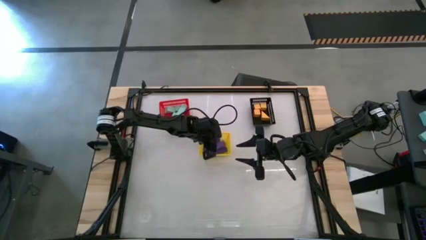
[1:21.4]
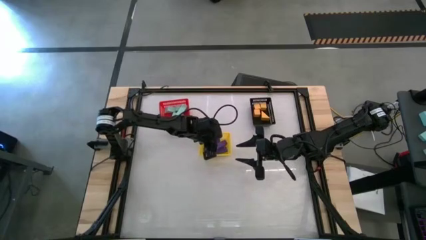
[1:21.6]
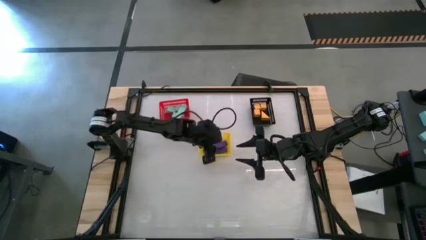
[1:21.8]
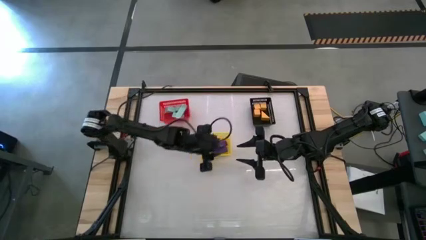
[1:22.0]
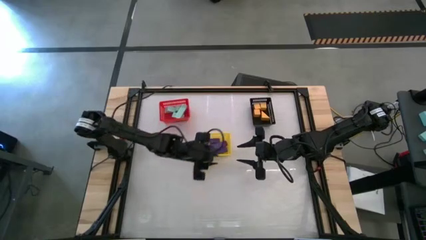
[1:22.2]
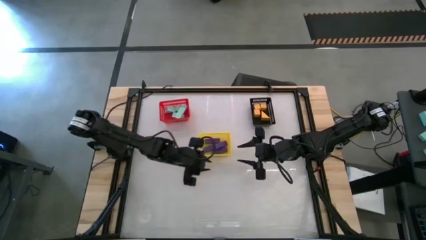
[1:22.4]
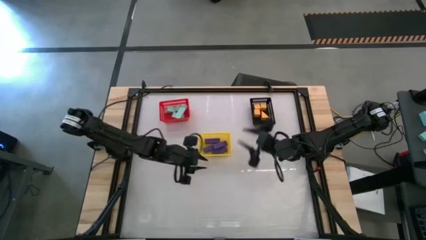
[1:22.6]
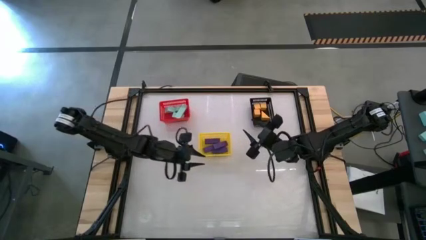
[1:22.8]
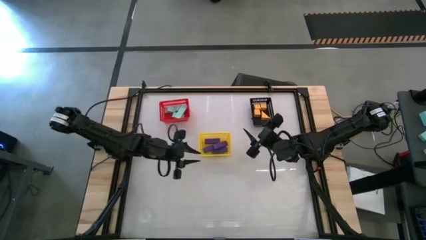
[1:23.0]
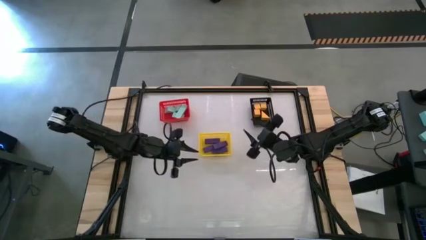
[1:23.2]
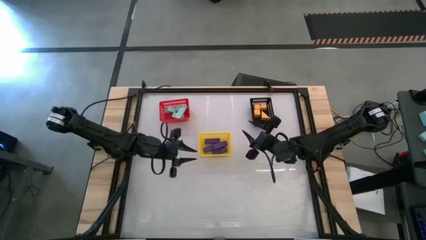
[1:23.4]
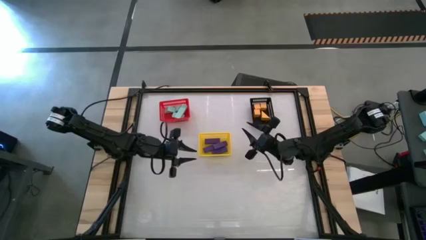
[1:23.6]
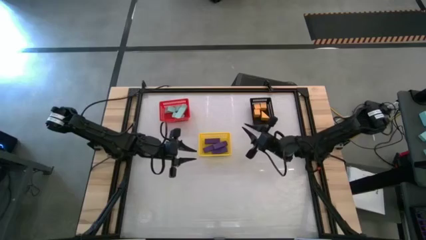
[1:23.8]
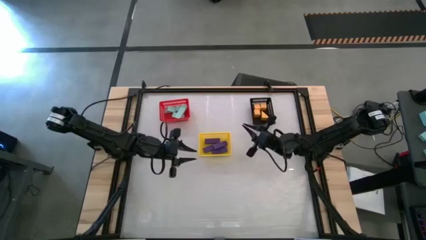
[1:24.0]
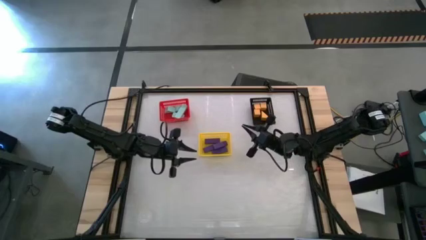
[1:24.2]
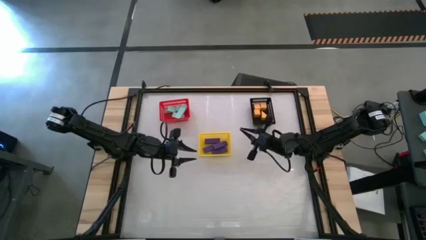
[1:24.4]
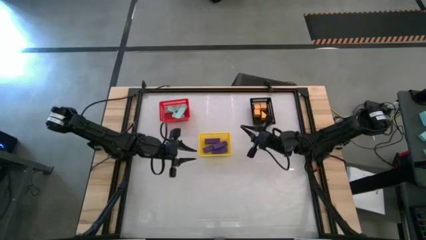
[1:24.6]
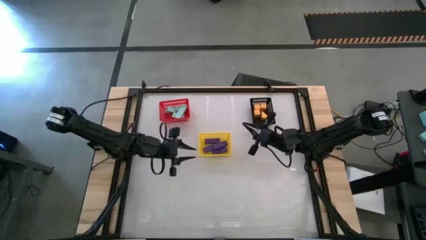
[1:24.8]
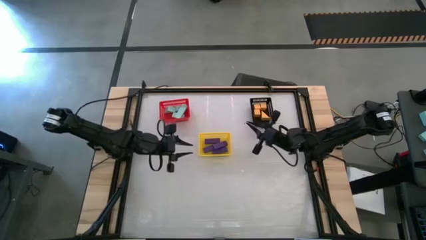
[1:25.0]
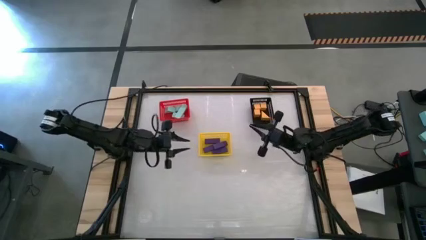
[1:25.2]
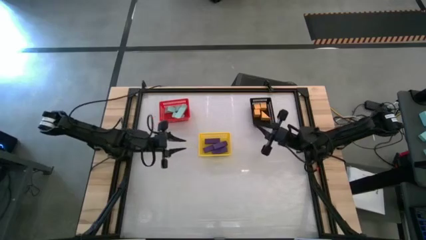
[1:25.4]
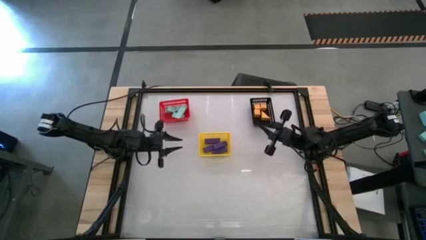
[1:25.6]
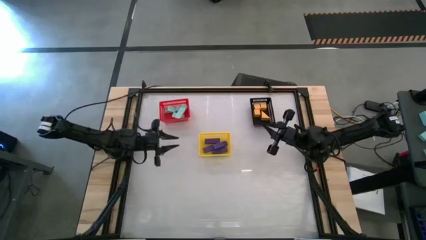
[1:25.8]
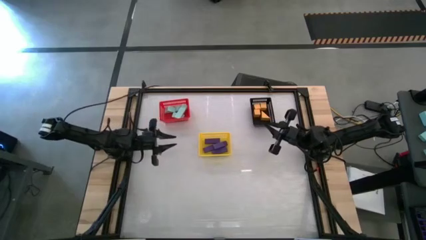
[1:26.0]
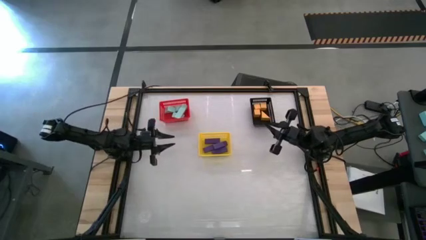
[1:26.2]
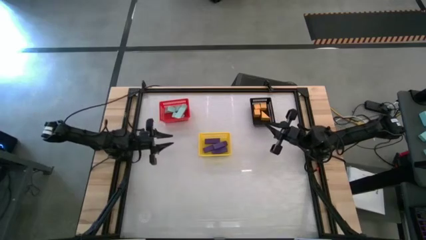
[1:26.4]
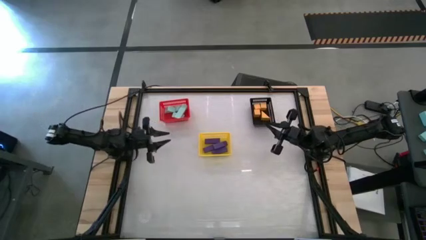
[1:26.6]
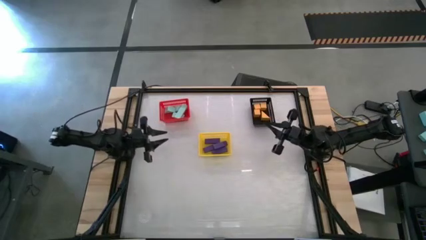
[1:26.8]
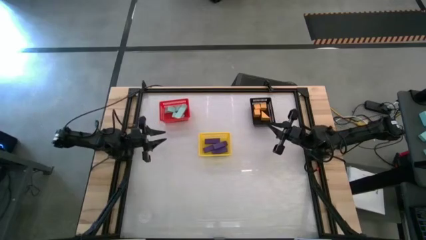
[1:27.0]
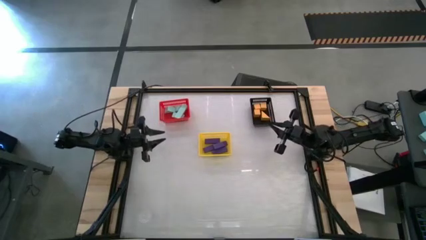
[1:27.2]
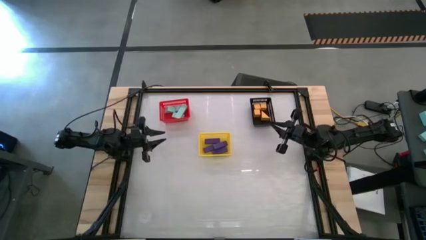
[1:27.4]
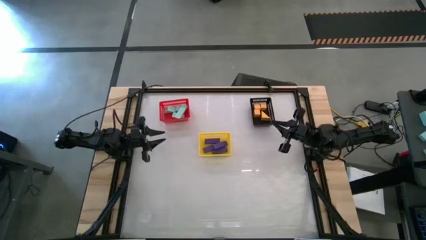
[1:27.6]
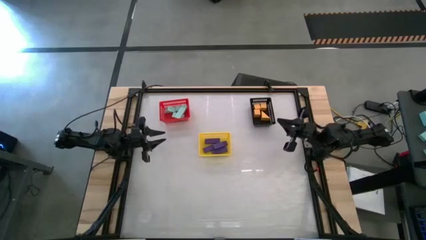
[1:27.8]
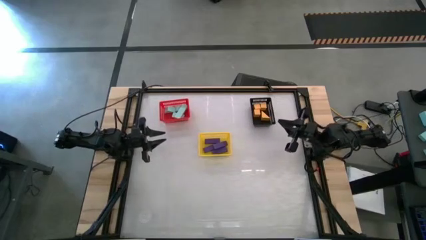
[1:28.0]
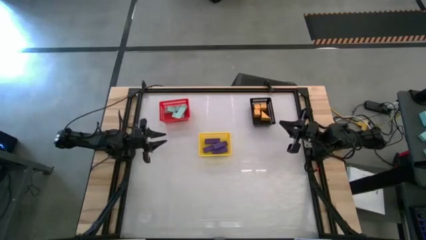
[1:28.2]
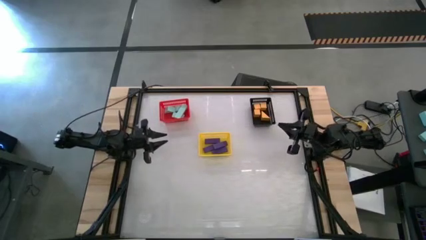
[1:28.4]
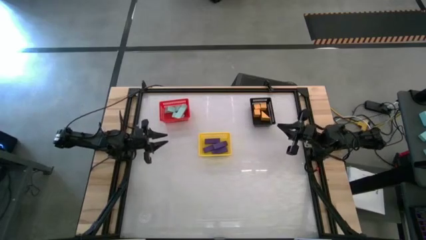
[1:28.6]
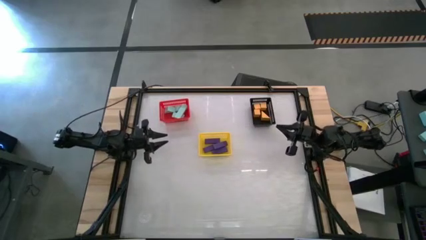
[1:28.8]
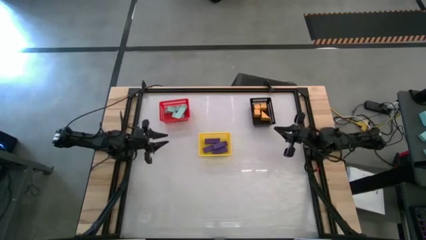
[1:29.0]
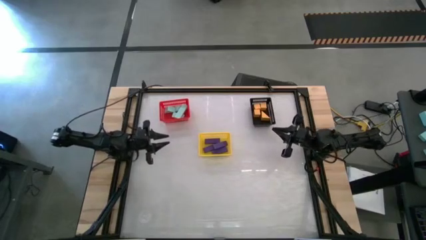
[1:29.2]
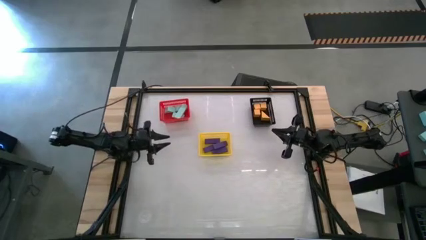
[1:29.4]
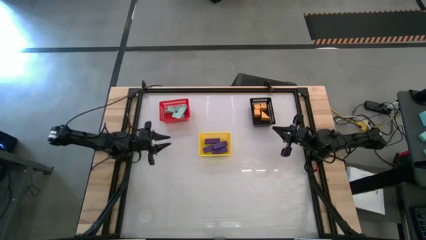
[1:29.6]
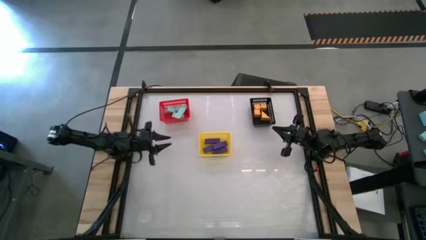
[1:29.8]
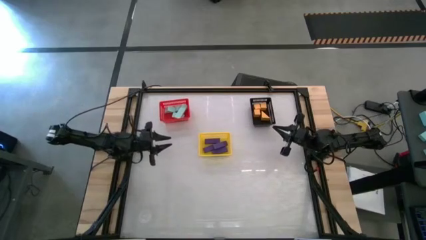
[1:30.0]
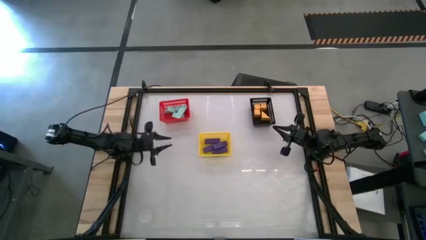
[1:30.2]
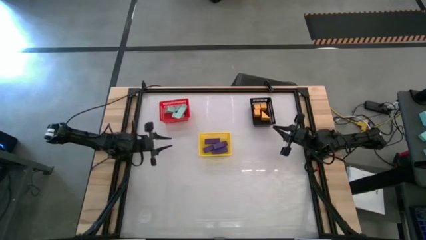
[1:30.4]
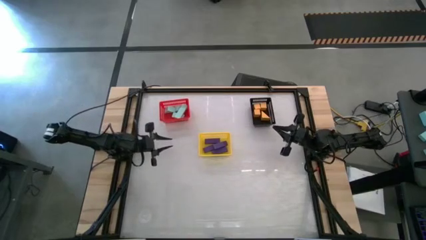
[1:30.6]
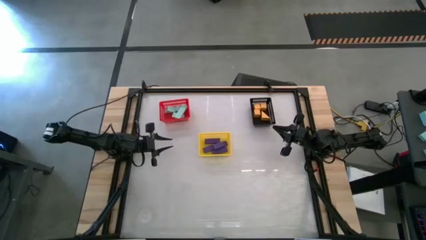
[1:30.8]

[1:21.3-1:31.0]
Task: Sort & place blocks by color
Return to Home Position

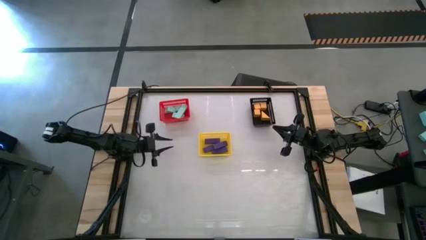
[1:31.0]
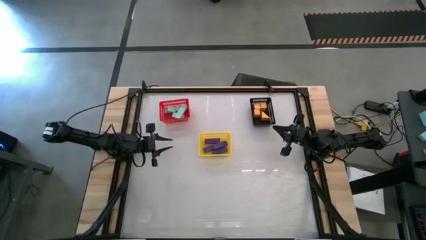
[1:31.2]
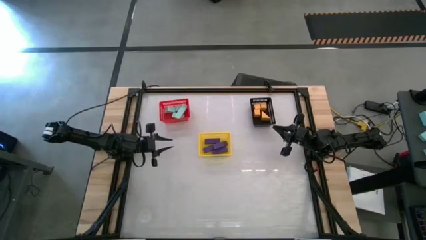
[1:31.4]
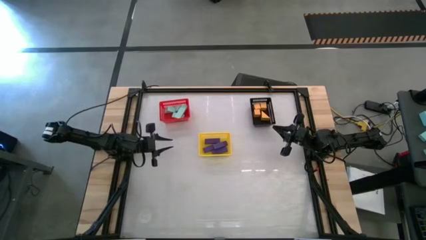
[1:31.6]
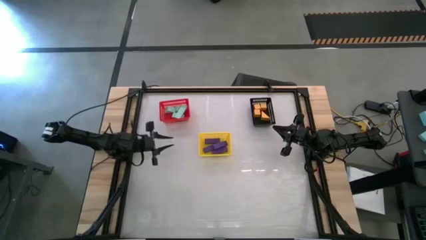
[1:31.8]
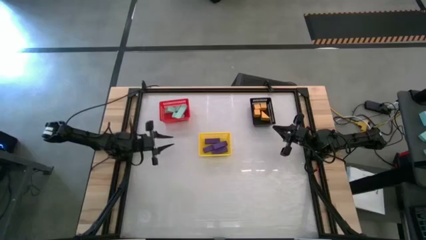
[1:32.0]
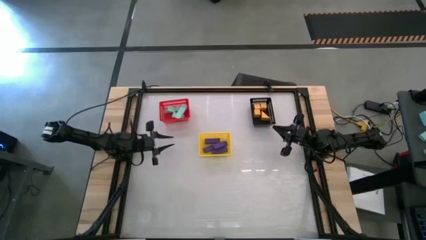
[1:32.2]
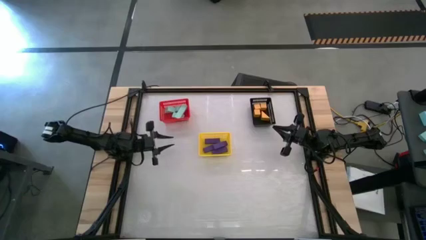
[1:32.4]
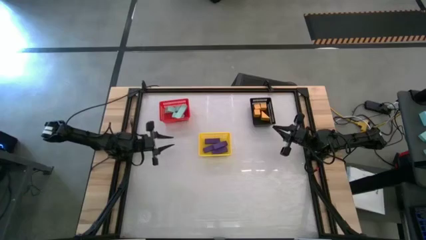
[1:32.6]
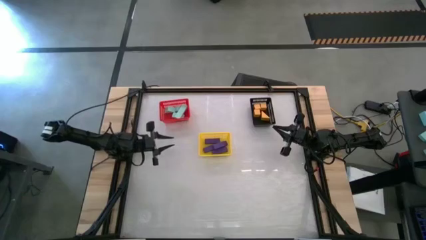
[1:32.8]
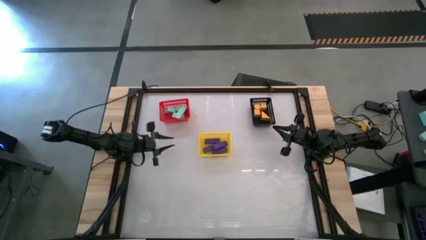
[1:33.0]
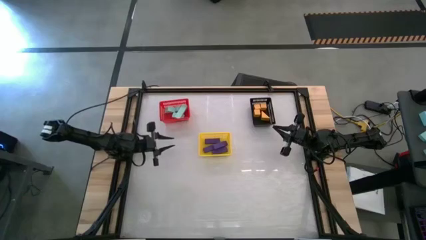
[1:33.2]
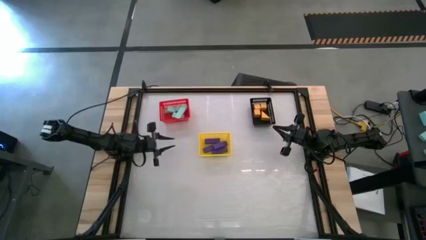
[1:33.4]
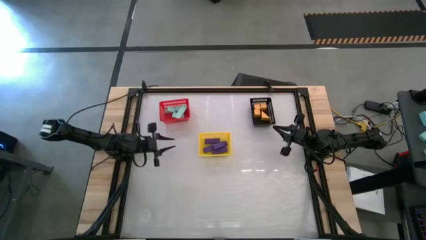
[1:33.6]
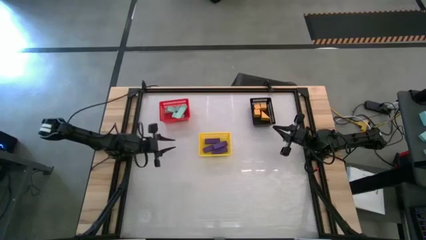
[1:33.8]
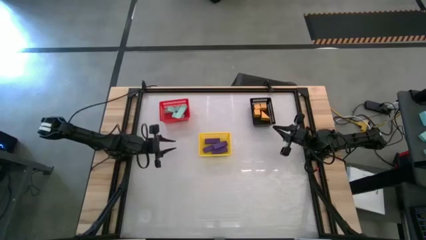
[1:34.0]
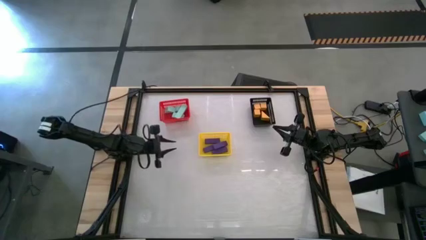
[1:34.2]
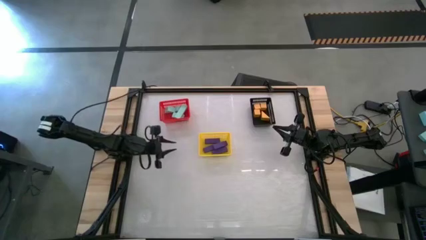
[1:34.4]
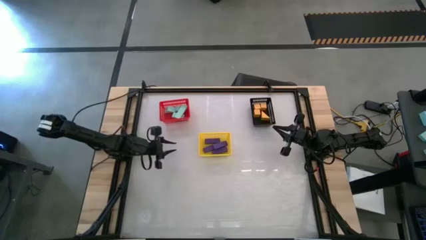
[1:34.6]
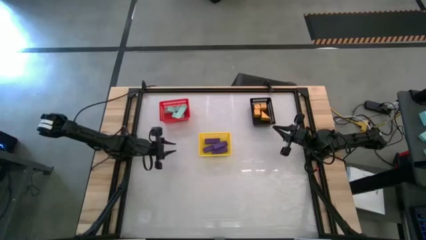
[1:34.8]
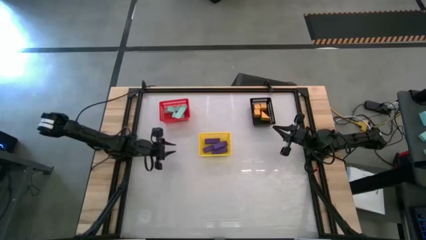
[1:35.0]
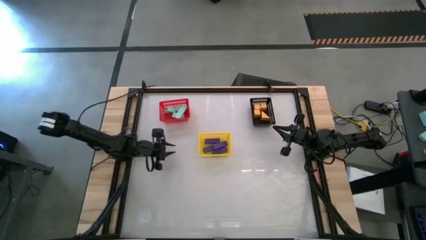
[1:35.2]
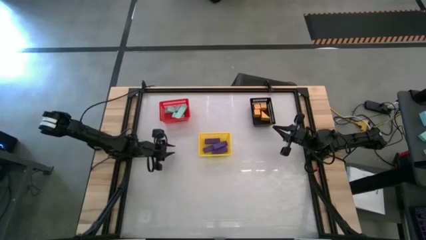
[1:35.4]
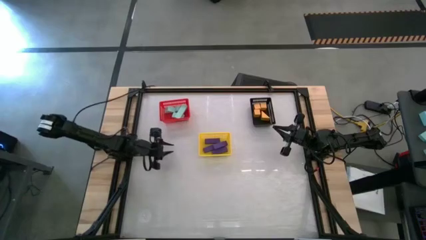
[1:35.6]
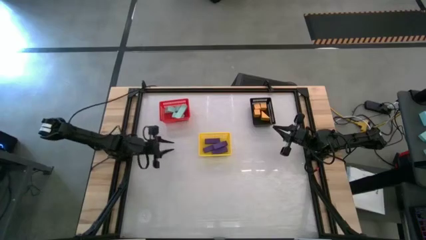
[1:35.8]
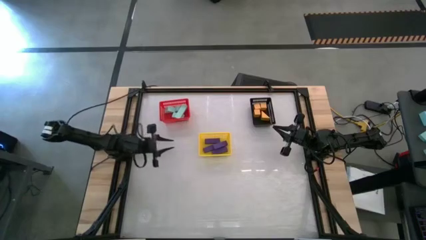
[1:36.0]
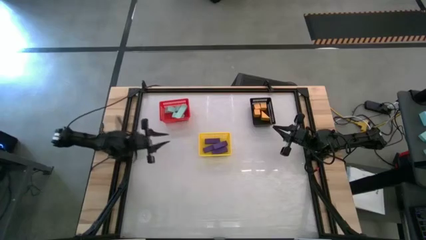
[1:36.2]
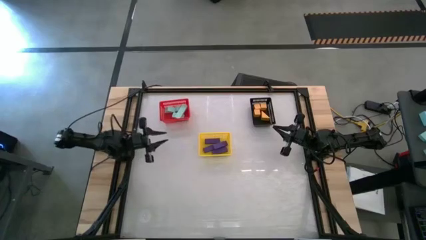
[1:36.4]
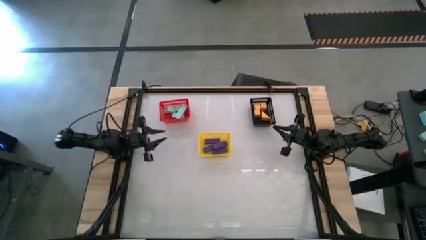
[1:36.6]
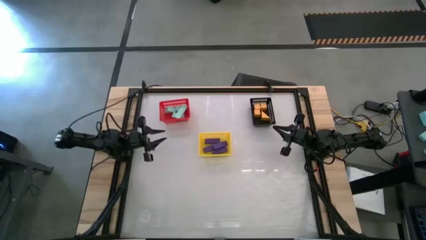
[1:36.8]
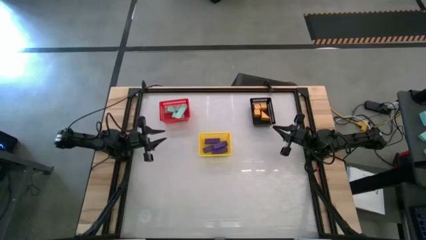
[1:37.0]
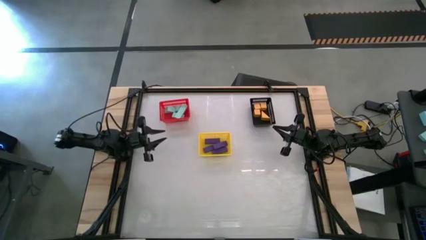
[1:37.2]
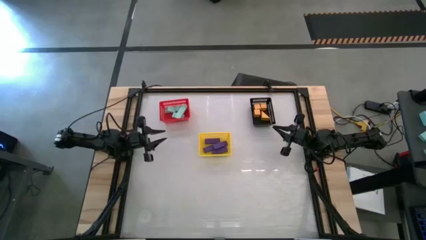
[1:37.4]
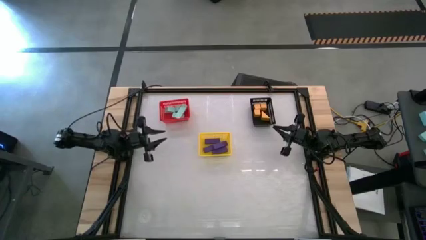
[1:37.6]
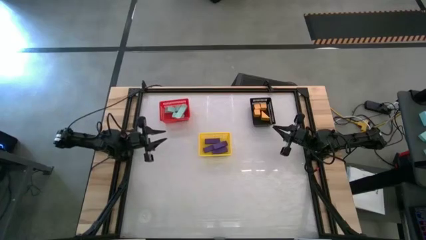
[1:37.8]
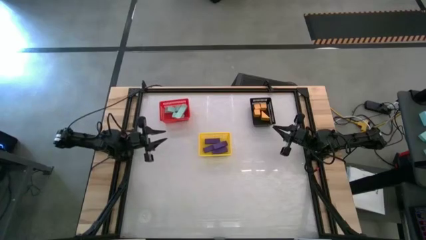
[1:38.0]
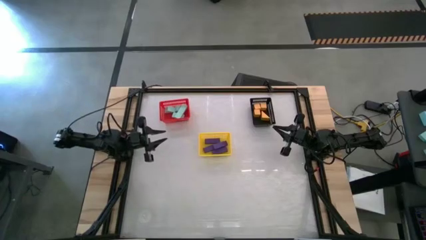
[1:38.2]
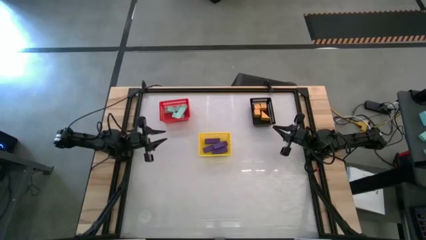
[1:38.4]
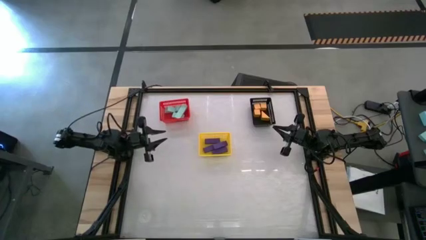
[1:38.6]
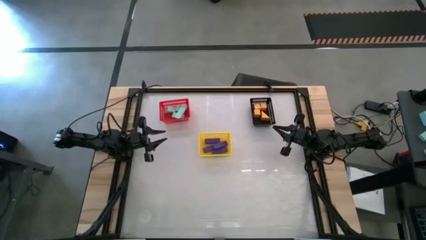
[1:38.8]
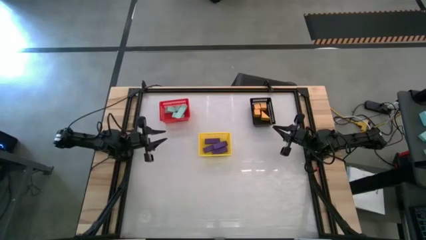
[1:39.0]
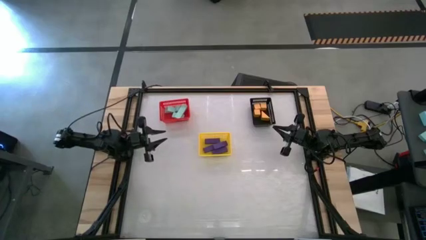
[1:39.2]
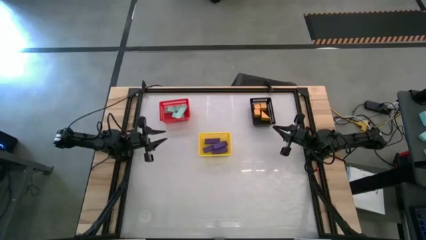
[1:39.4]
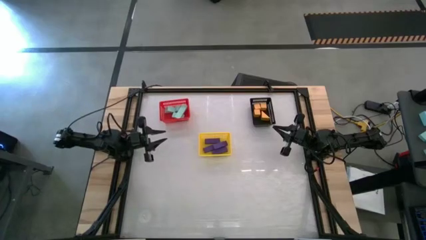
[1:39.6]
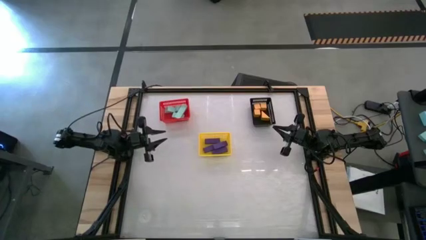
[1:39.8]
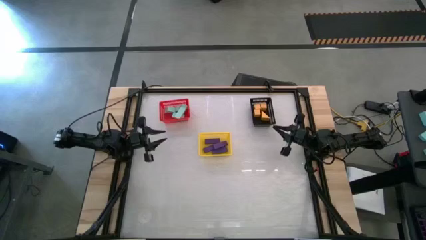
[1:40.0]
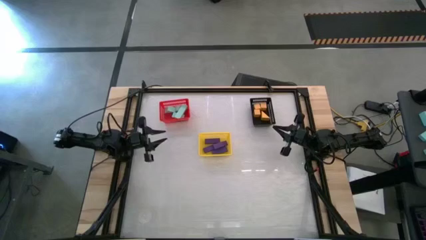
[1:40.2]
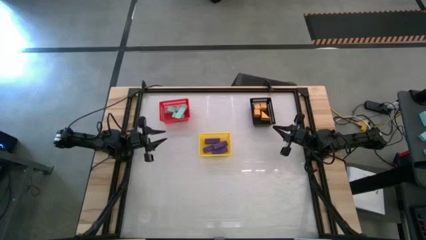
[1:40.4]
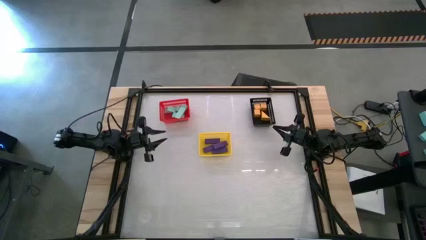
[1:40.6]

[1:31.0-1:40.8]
Return to Home Position
